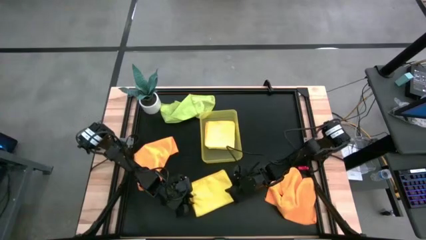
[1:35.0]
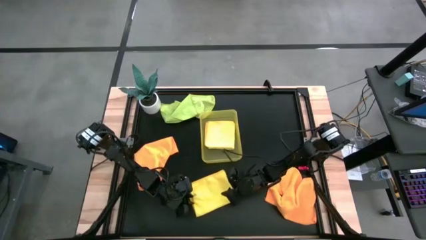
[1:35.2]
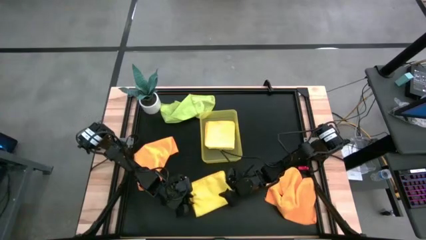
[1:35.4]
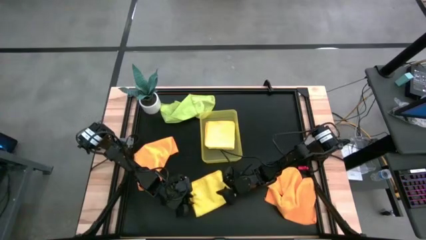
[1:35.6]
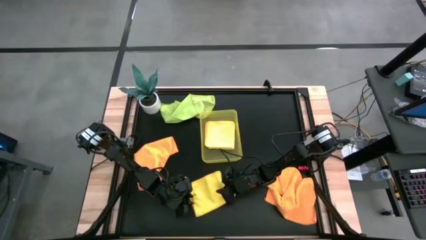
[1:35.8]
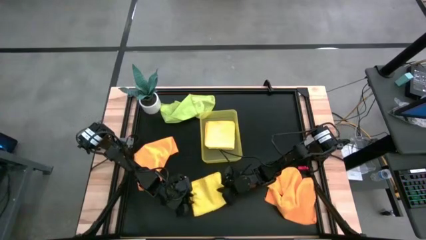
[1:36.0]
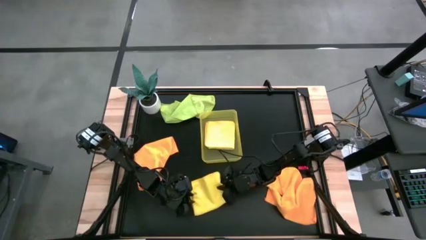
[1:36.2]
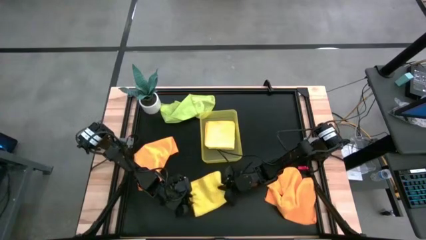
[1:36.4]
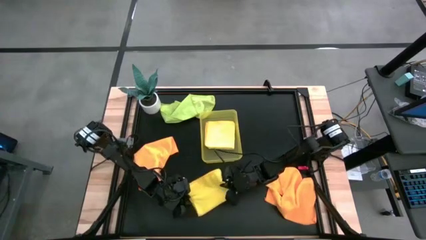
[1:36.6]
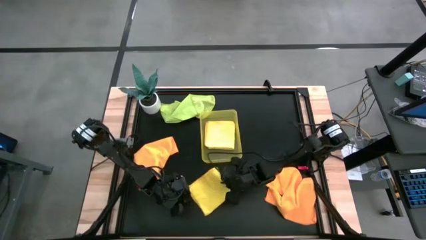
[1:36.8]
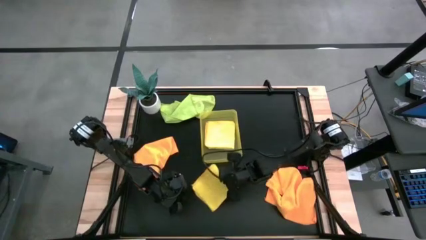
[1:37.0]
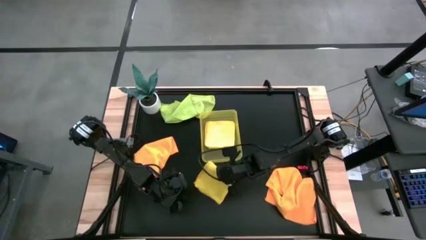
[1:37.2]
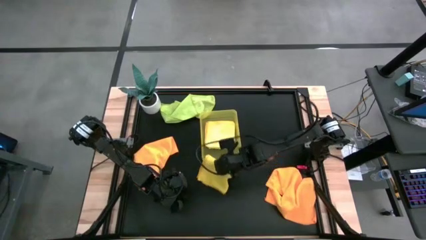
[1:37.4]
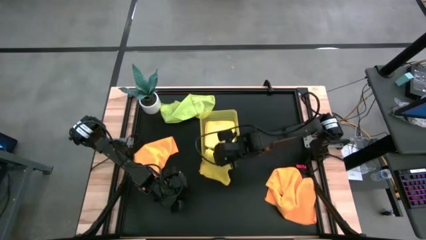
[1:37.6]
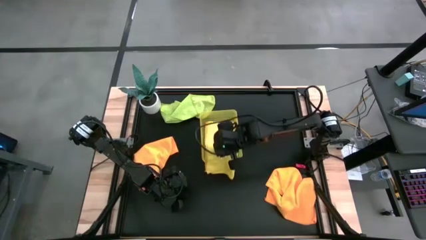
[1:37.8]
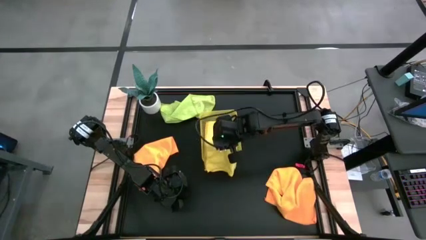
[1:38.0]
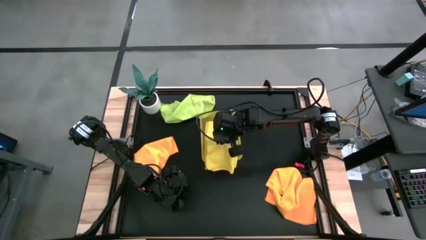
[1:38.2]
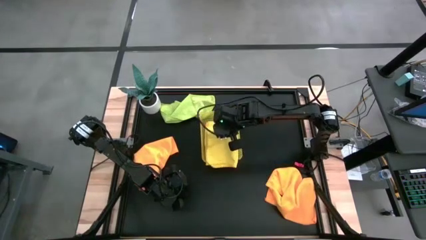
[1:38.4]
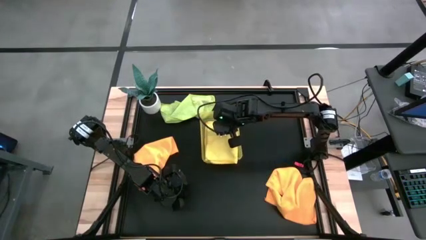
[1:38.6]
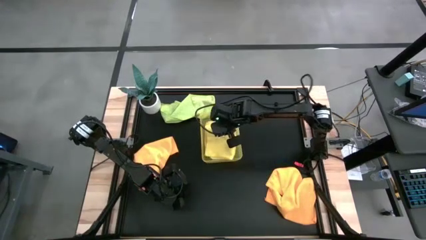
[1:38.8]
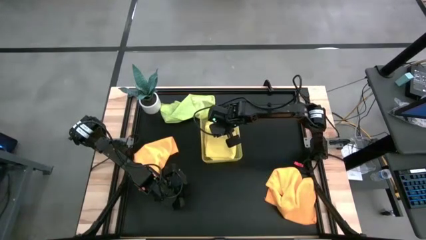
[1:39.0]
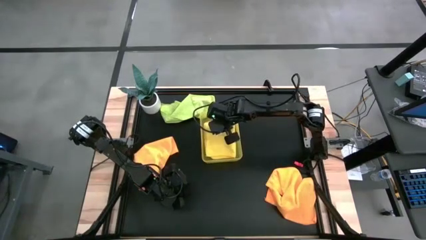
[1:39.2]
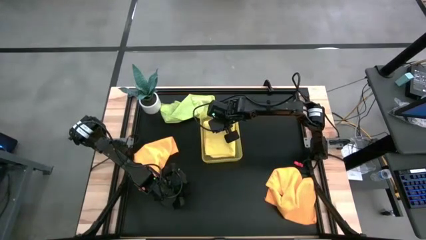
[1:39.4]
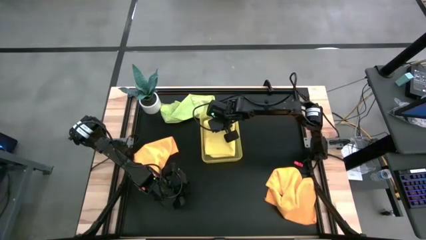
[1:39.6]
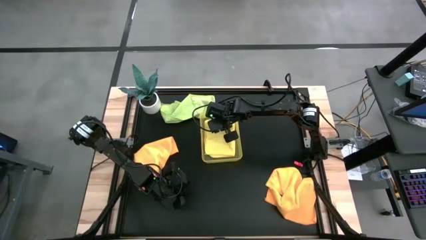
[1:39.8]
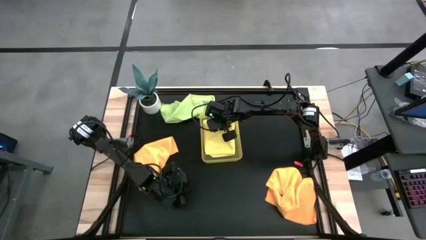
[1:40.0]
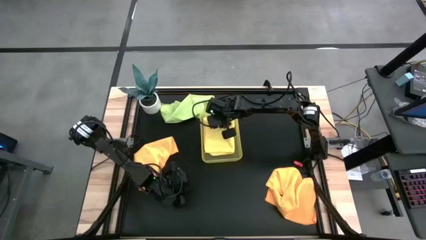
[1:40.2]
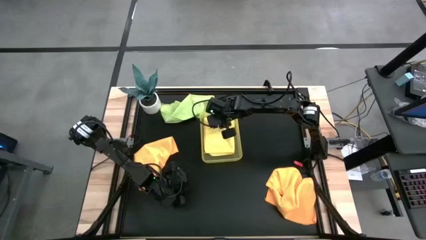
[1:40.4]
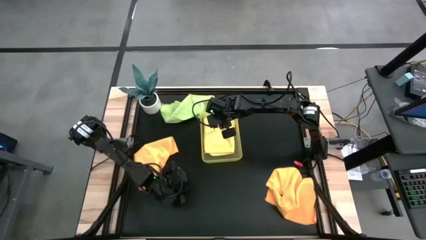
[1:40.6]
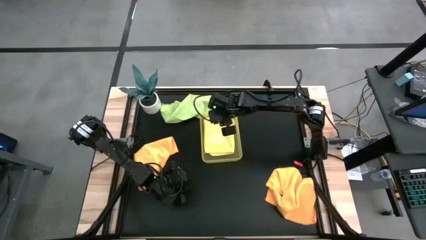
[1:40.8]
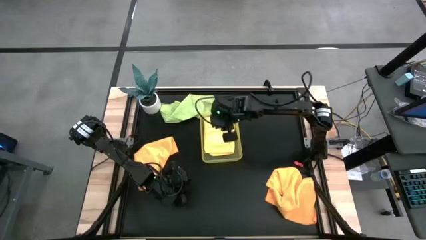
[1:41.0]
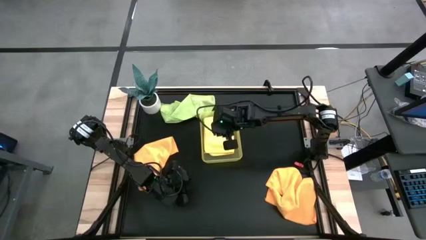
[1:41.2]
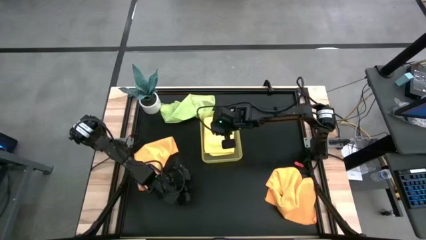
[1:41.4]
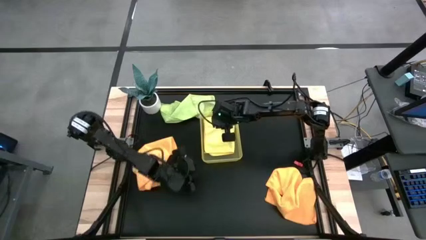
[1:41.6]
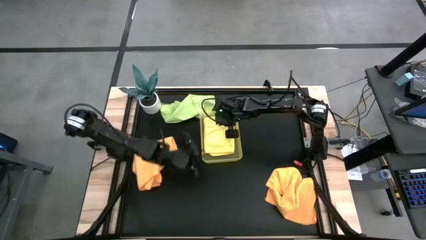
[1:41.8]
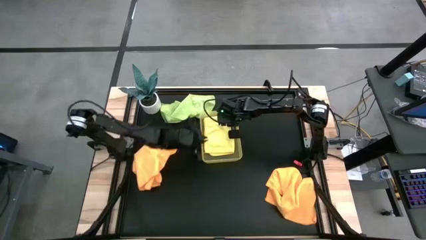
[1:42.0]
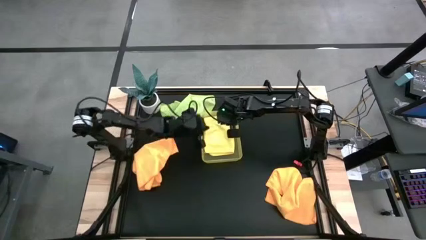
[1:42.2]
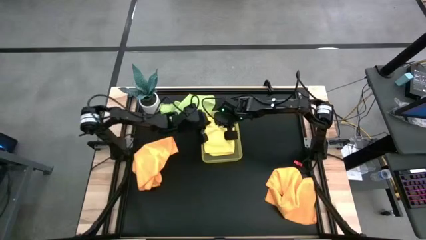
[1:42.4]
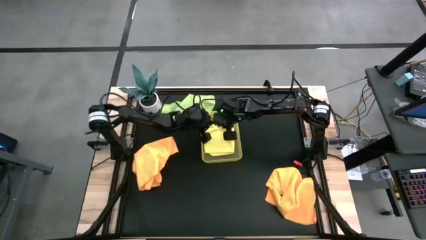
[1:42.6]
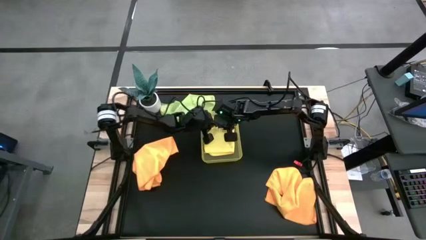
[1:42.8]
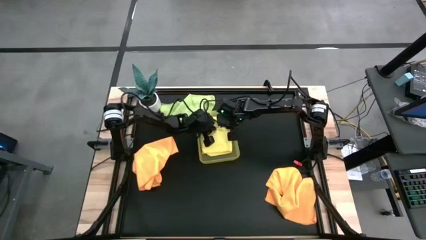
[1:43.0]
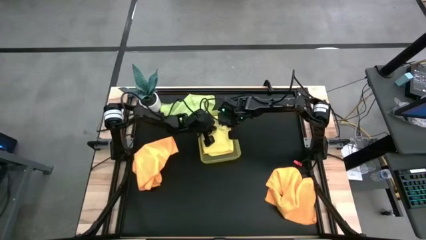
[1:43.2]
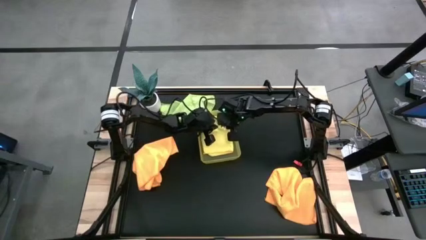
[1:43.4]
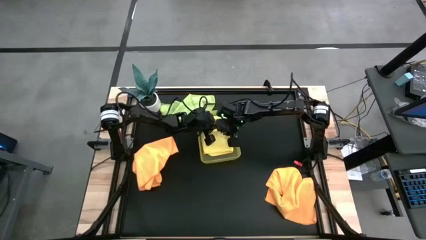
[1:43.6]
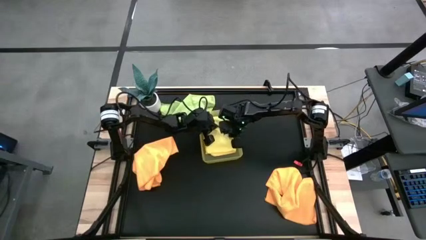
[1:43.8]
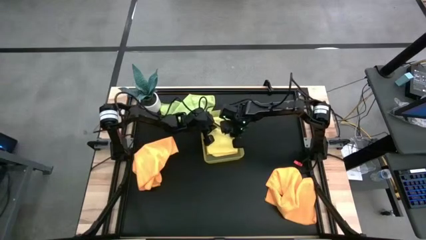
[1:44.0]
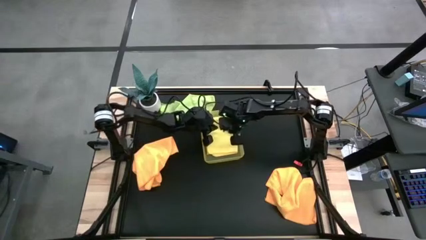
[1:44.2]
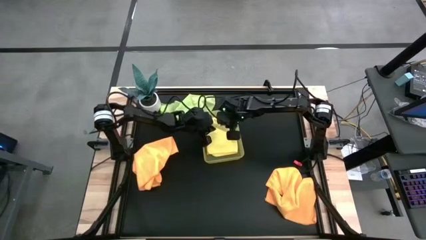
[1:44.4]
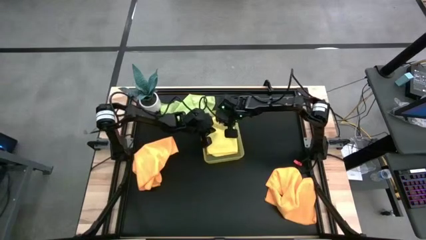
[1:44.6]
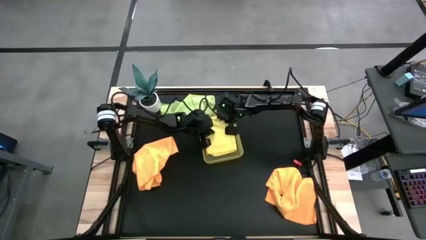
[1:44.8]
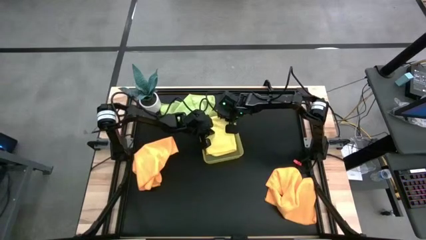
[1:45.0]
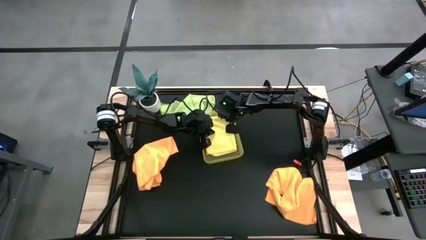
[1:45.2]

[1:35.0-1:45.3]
Task: Fold microfiber towels
Put the folded yellow microfiber cloth yellow microfiber cloth into the bin

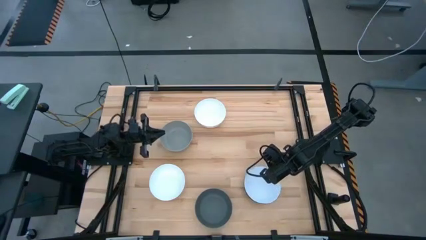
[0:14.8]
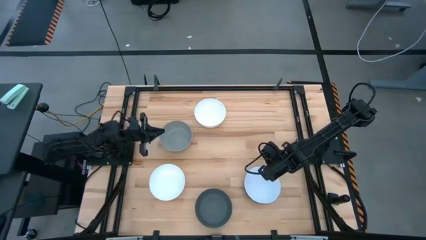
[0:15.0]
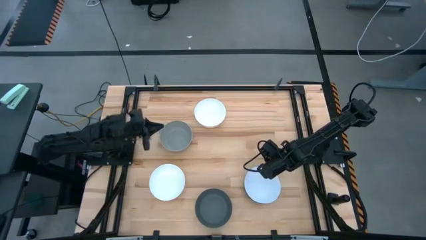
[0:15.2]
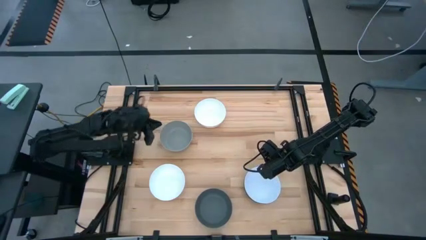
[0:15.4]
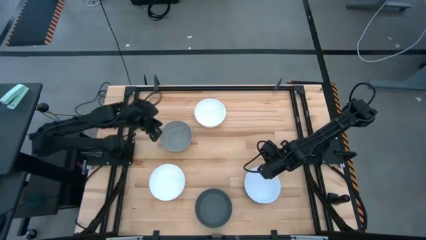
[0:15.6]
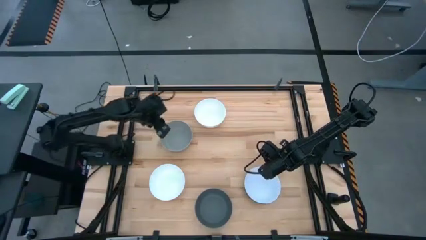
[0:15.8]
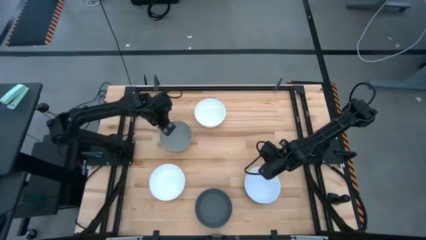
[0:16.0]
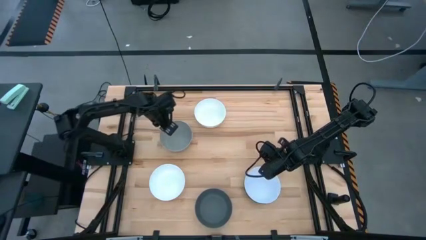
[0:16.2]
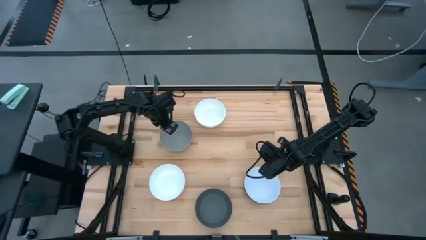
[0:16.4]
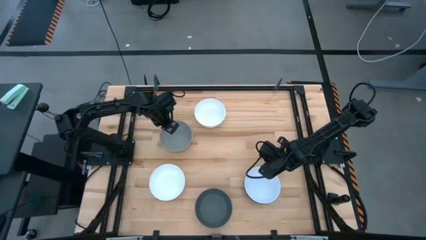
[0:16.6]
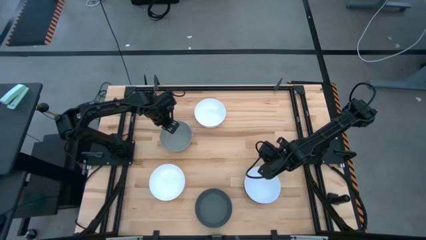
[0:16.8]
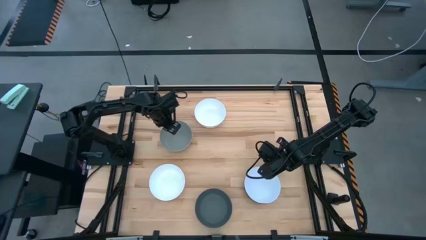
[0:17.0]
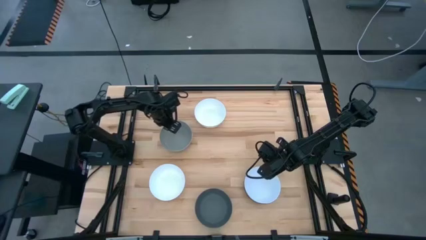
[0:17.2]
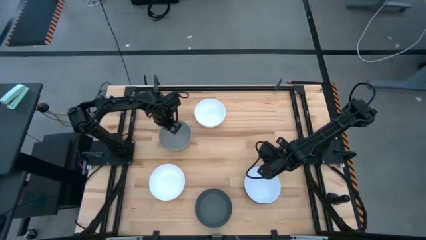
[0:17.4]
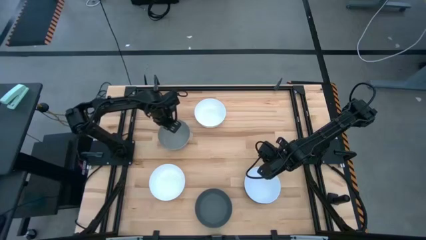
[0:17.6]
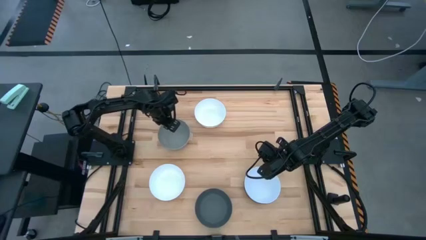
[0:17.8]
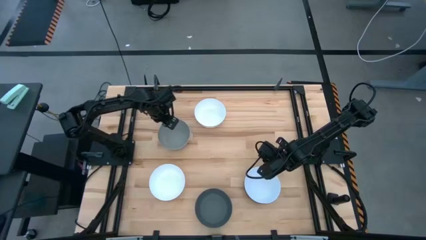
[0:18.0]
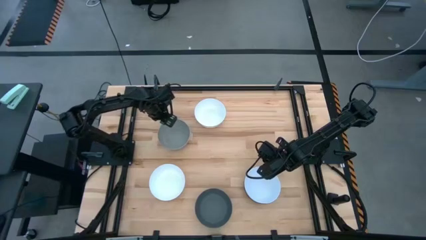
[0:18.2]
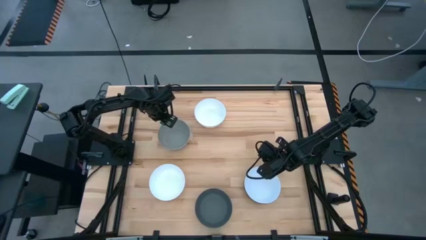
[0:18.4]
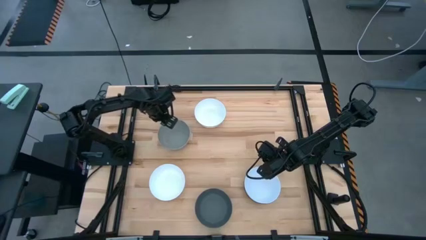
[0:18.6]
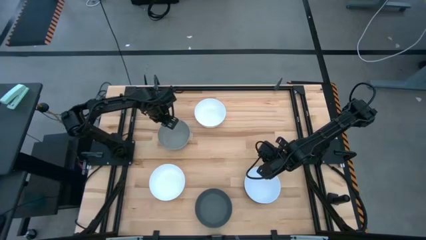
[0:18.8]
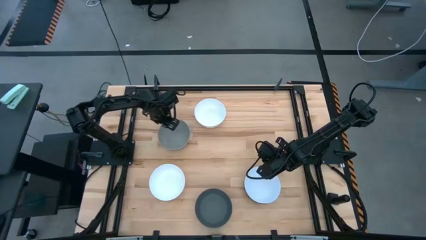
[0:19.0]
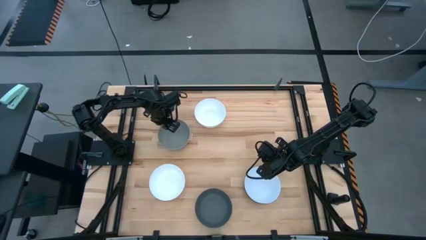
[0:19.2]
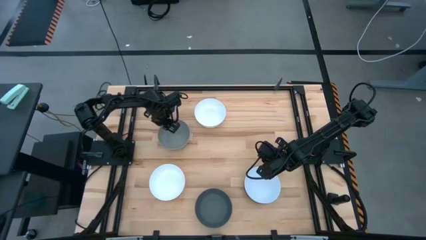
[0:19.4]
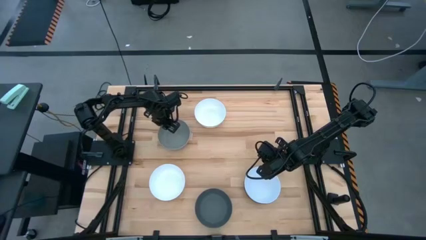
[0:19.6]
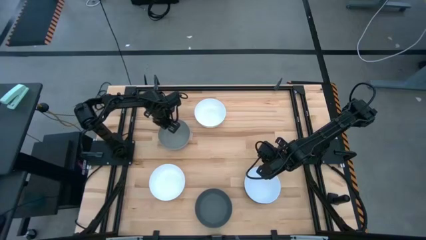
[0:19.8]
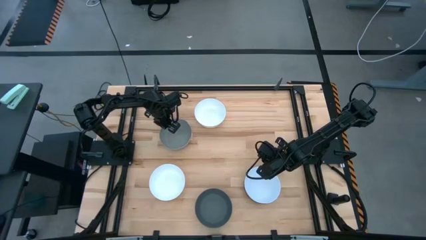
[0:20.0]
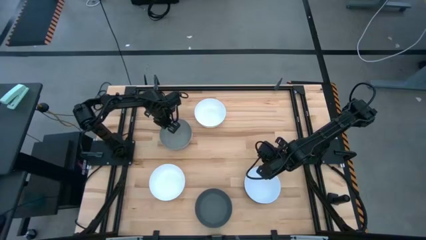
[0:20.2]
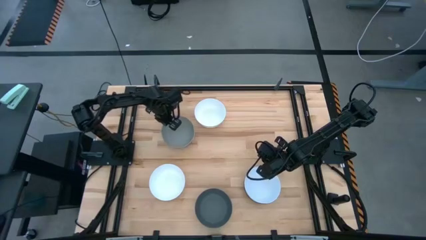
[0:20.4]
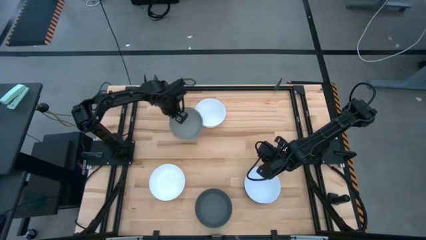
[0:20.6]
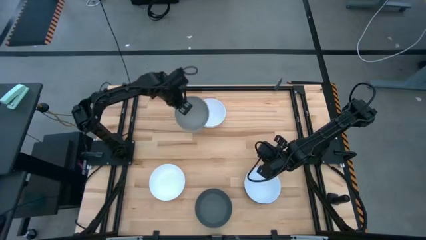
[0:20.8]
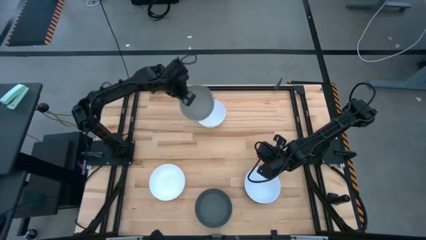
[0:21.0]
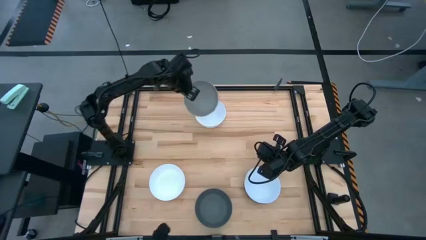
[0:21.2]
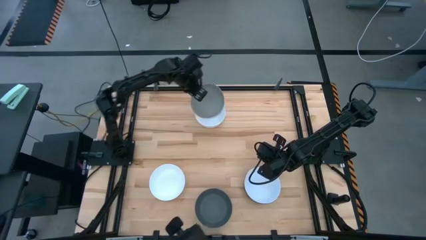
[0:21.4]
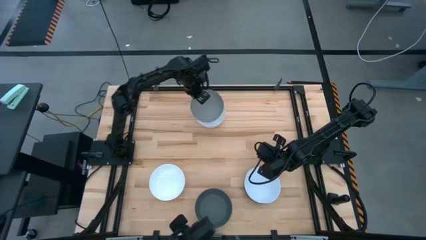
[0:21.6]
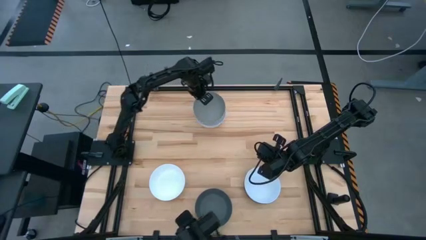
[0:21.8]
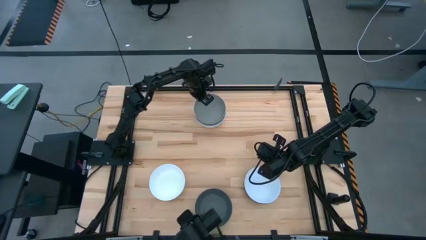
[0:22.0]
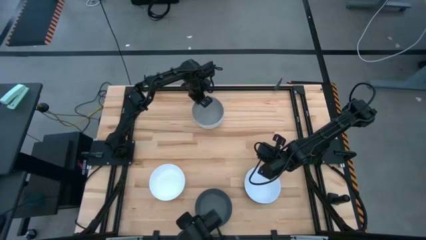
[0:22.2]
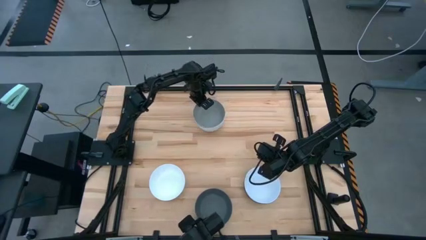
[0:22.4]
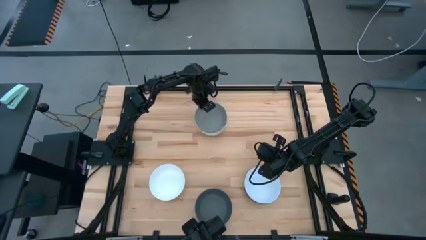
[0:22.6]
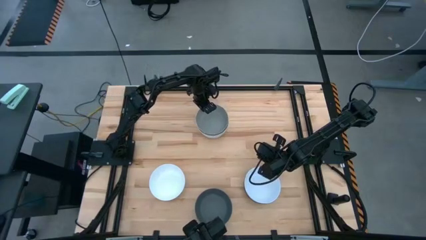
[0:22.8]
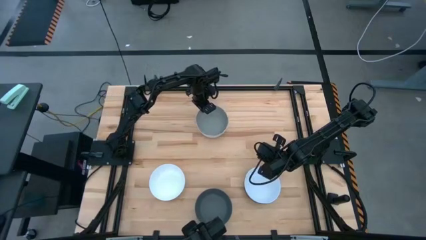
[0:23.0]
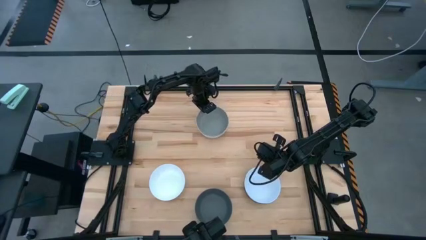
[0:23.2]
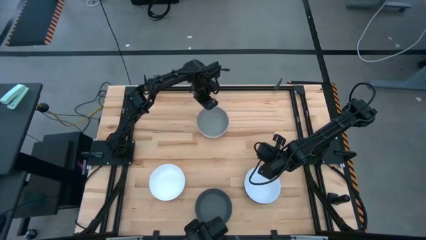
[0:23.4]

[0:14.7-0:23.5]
Task: Nest bowls inside each other
Stack the light grey bowl on the top white bowl
